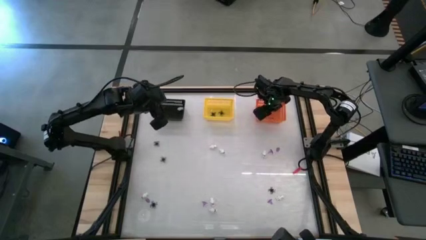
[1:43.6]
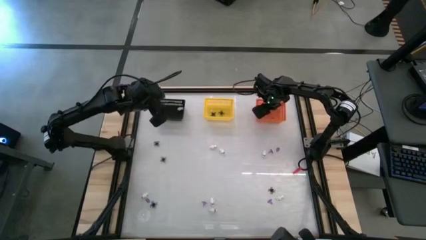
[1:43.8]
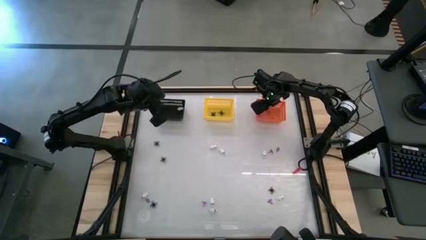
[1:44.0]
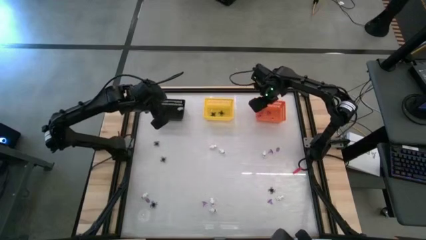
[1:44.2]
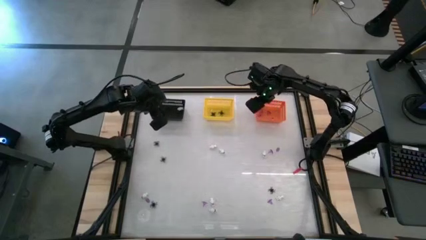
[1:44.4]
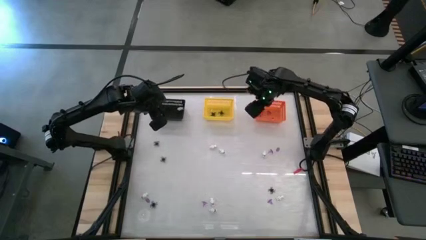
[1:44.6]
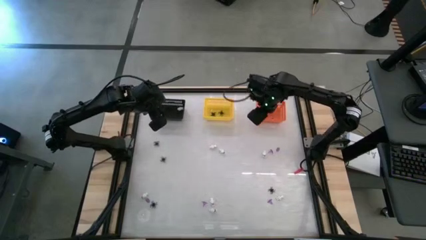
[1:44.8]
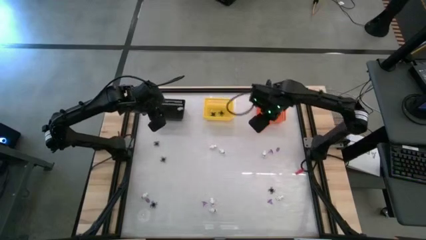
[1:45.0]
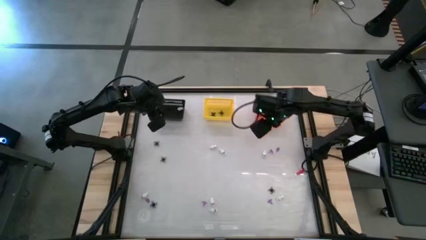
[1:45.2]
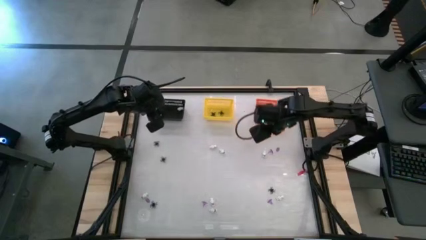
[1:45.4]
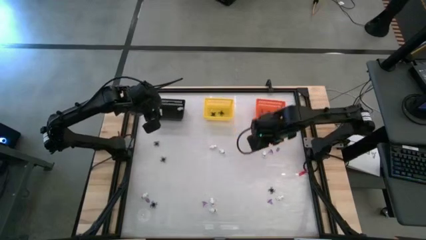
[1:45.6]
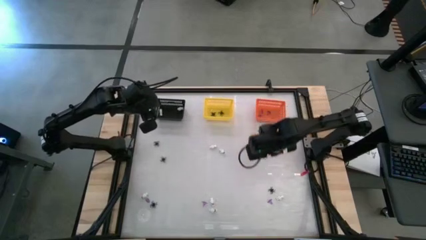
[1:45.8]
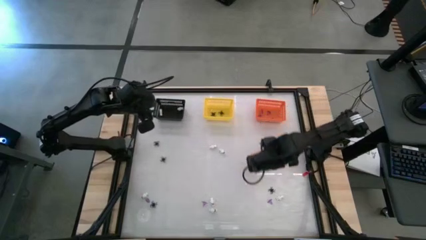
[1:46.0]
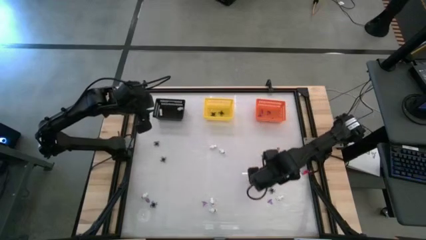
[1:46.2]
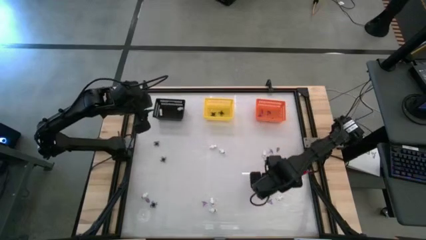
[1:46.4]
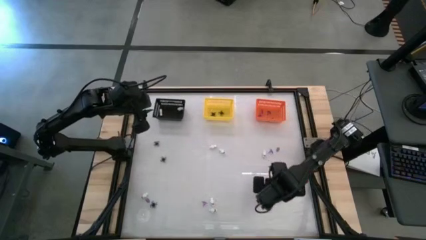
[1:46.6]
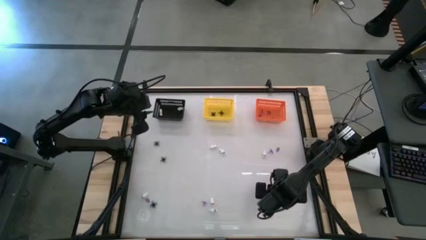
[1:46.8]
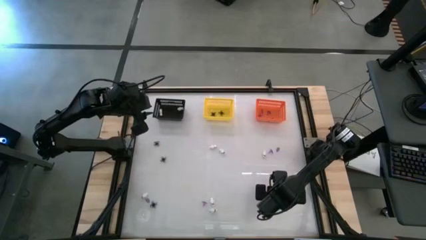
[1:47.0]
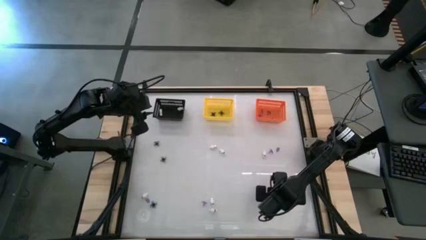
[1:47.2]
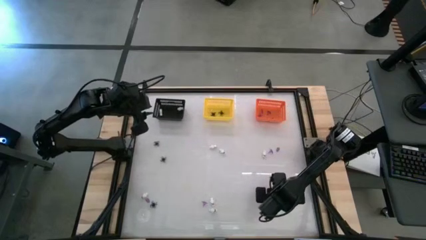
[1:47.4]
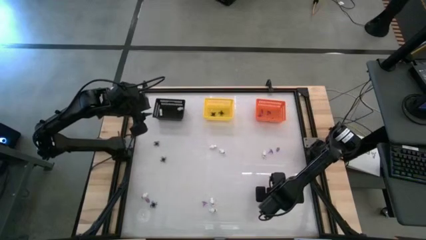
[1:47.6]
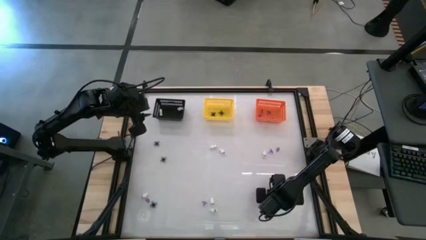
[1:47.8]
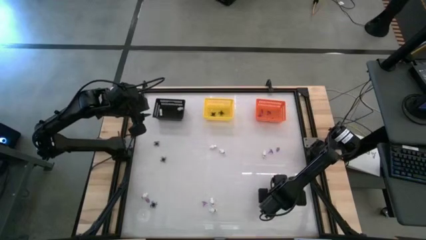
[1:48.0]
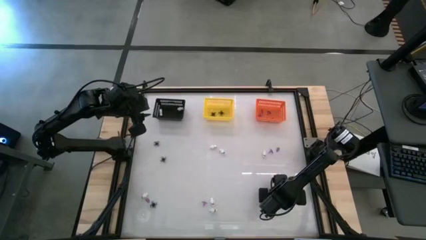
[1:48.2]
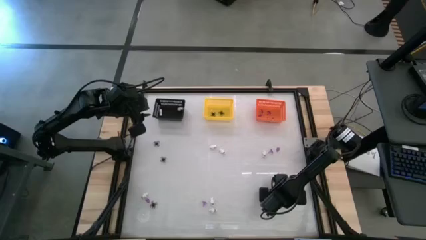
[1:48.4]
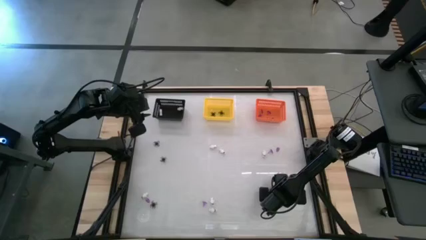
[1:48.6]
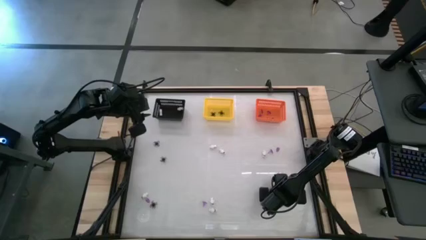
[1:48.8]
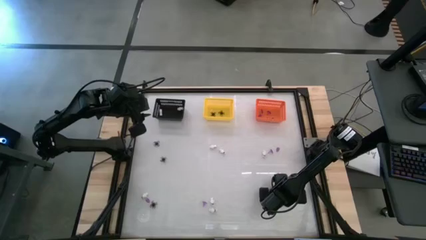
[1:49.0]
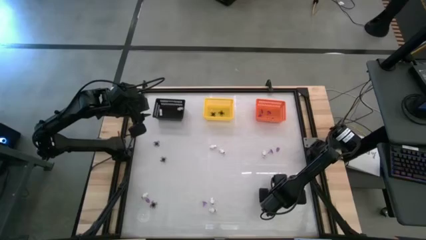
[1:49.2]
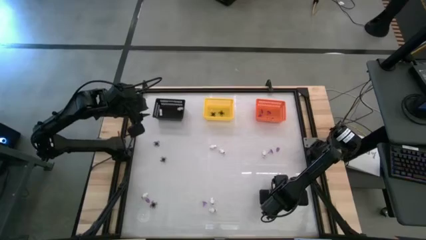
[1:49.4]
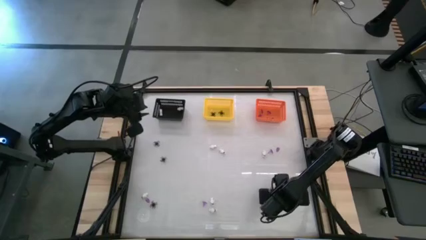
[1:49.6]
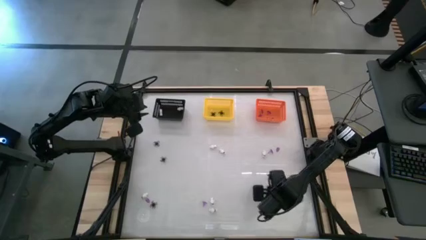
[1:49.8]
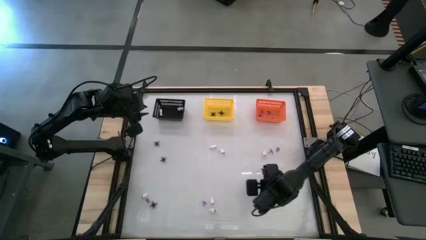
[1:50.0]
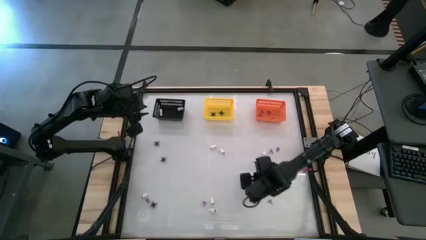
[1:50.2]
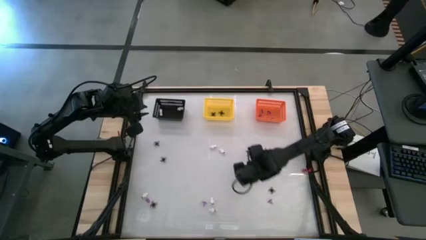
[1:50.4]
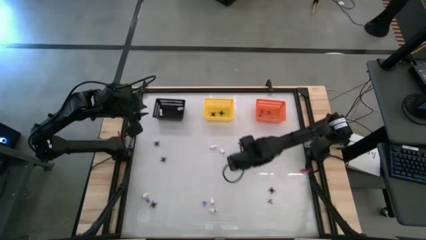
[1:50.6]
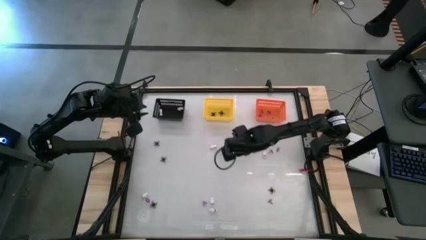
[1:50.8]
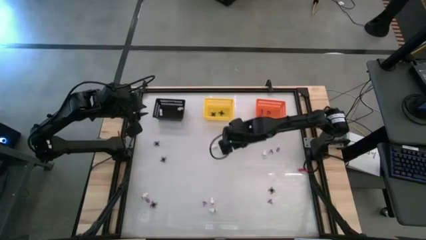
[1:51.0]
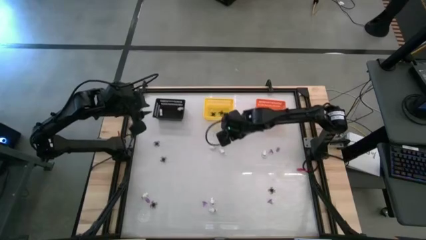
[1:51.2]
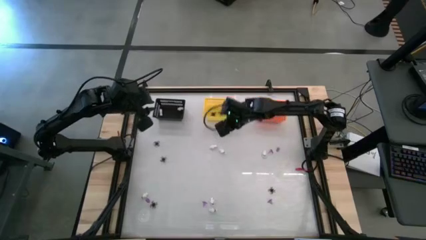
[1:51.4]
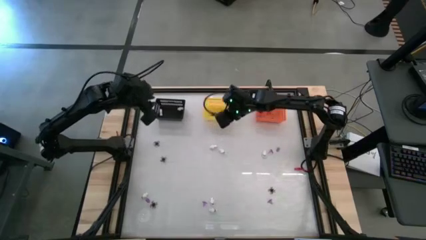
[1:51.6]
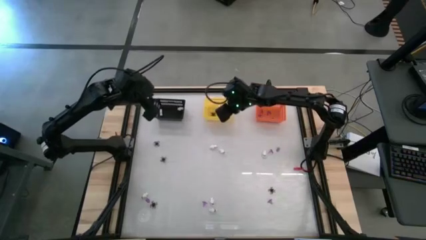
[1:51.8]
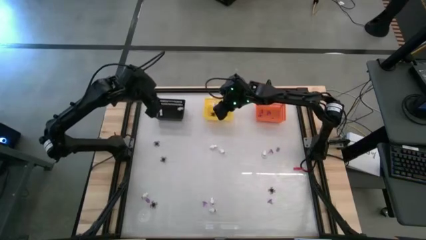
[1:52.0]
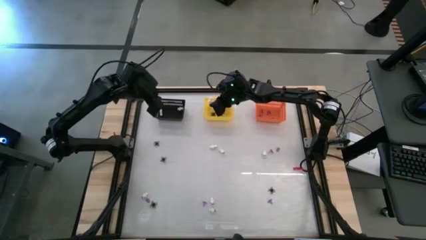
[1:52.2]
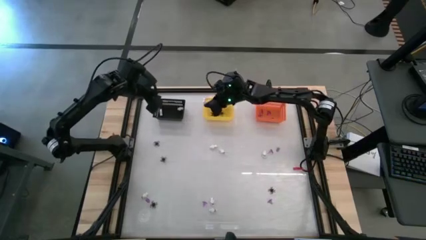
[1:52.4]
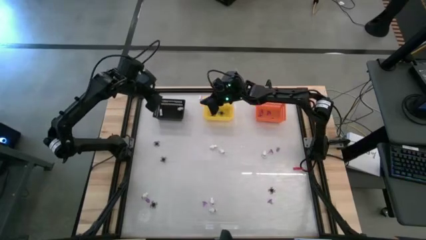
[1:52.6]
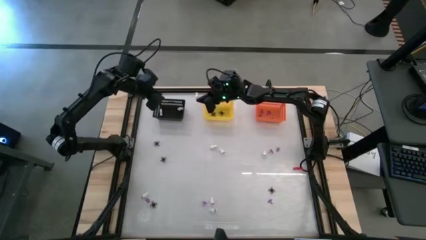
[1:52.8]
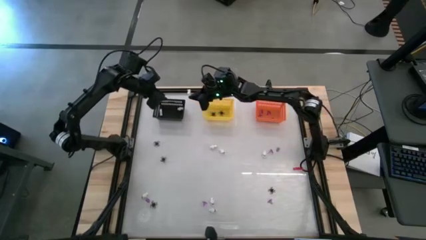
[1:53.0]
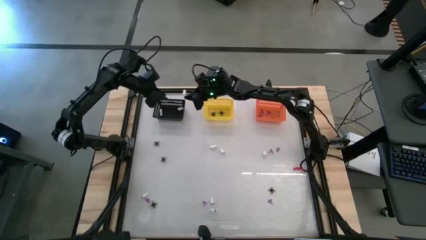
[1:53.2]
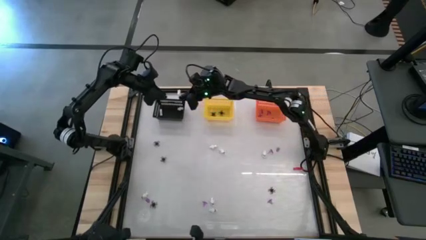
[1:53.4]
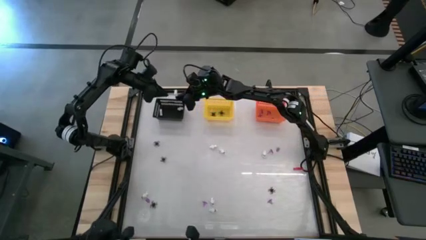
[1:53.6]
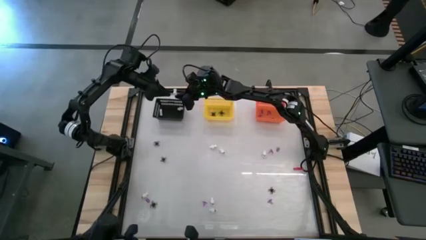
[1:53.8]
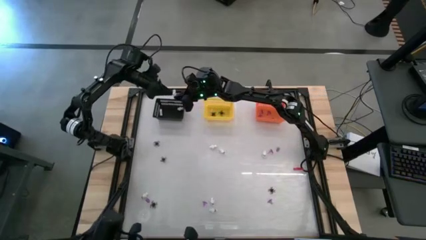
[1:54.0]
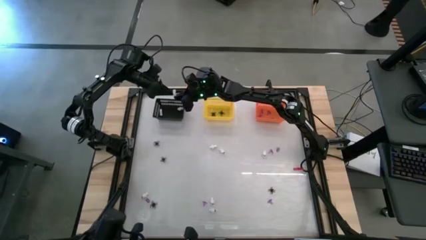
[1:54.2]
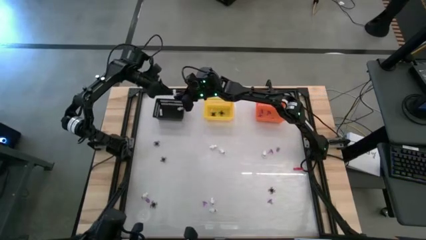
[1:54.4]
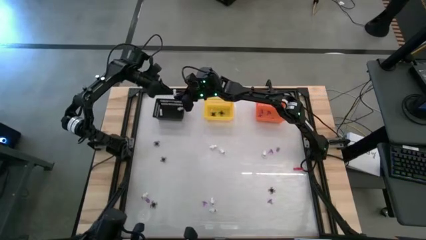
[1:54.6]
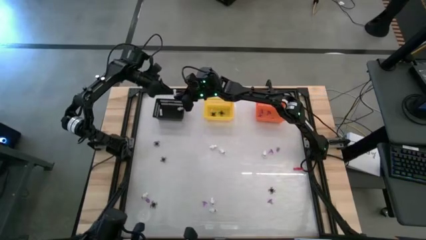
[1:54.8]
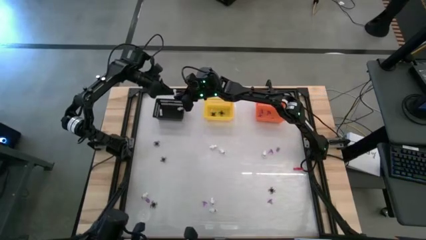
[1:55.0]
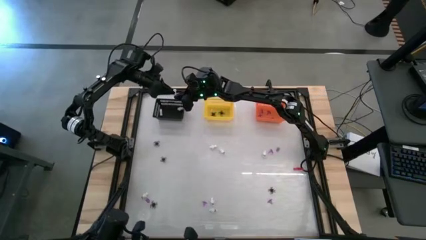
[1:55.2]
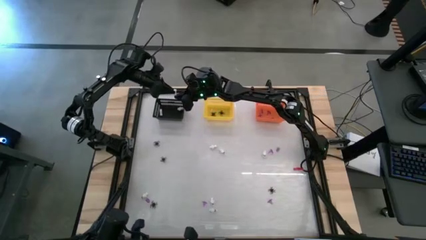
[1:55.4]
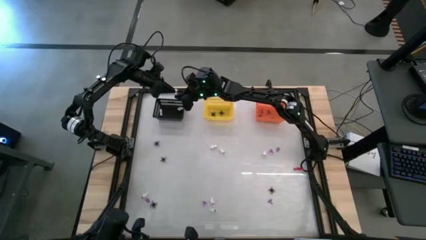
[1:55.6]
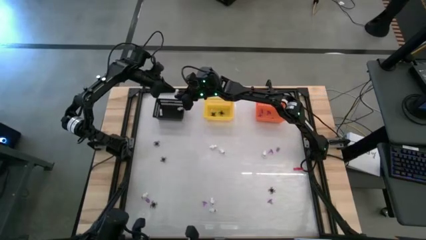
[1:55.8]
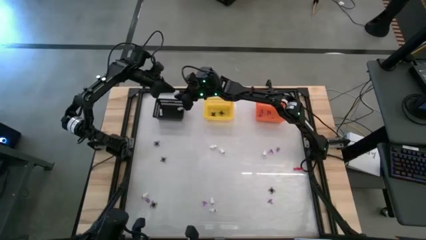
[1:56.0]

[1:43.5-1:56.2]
Task: Sort Halloween decoration
Put the white skeleton toy into the black basket
